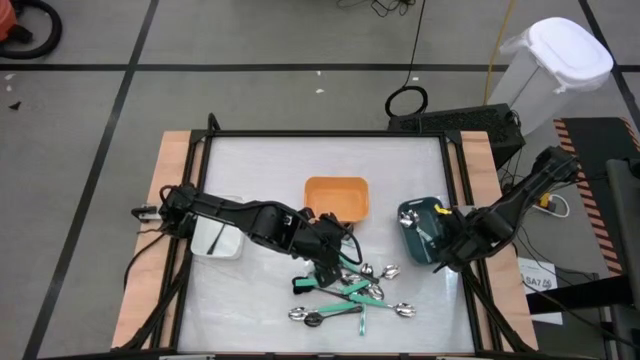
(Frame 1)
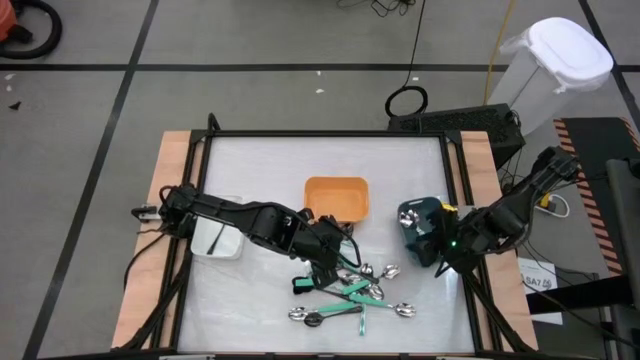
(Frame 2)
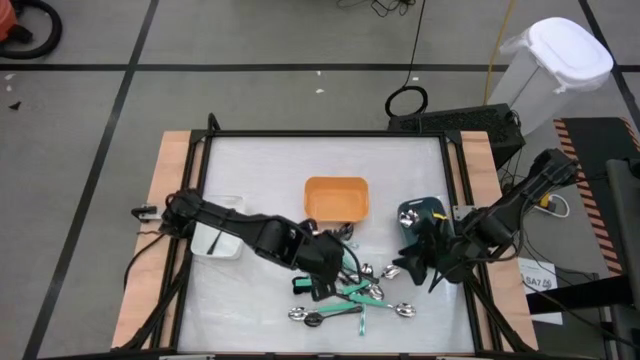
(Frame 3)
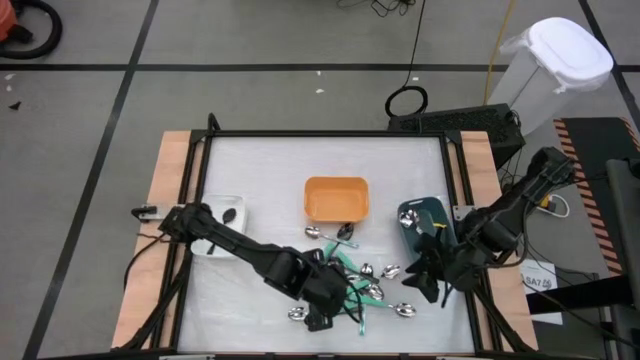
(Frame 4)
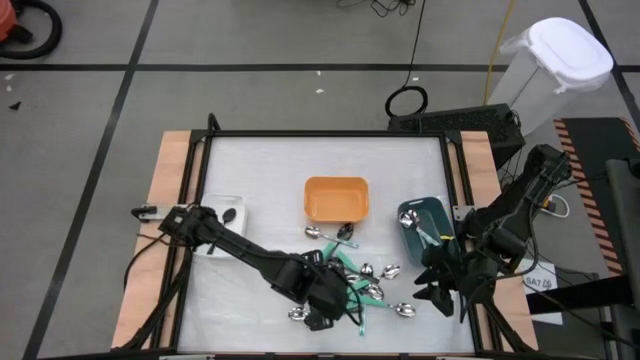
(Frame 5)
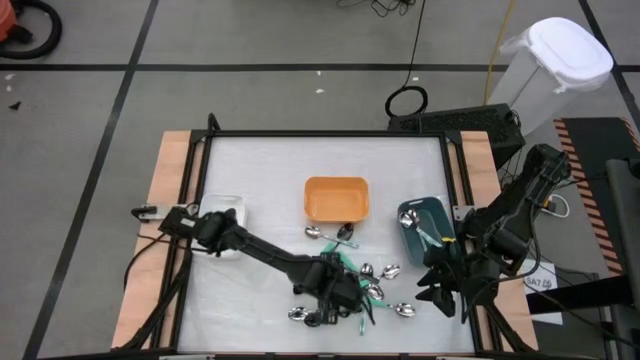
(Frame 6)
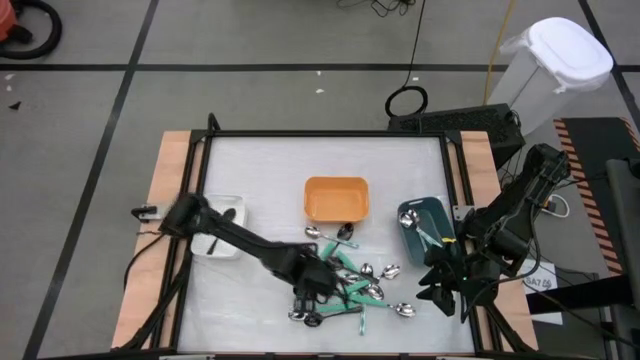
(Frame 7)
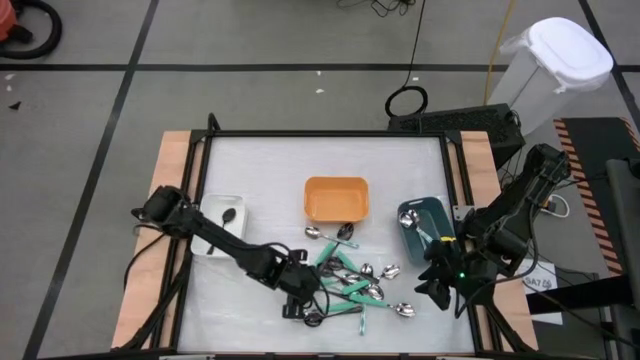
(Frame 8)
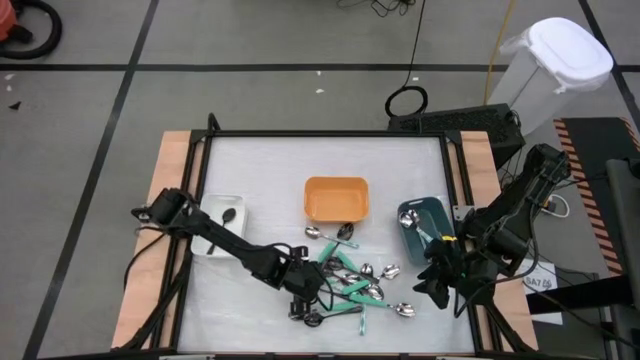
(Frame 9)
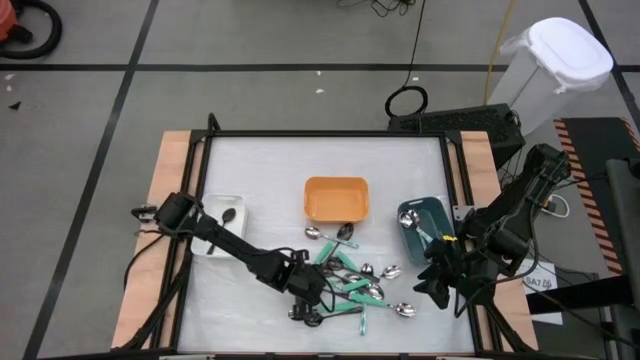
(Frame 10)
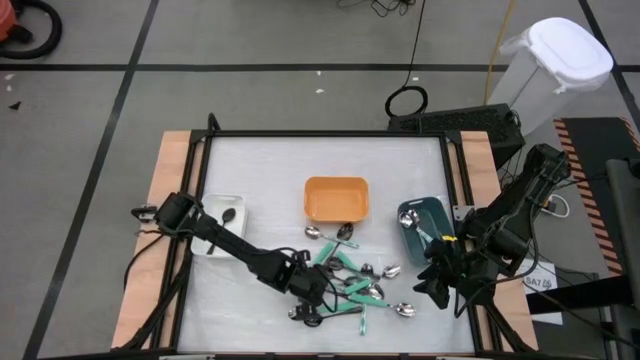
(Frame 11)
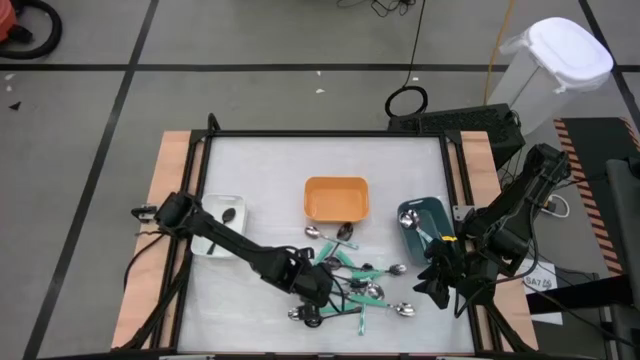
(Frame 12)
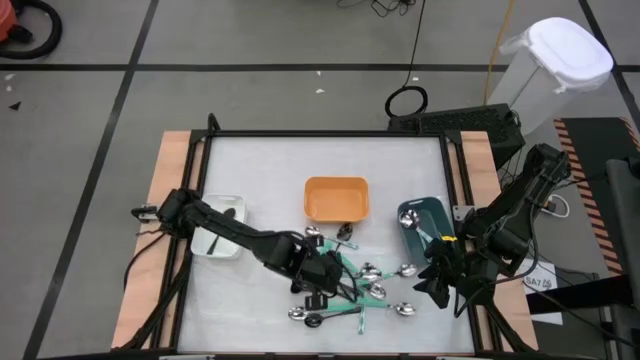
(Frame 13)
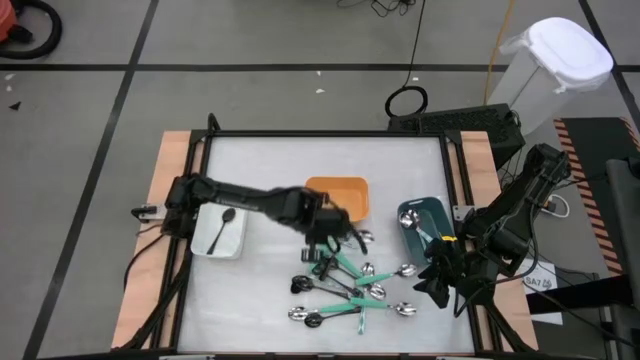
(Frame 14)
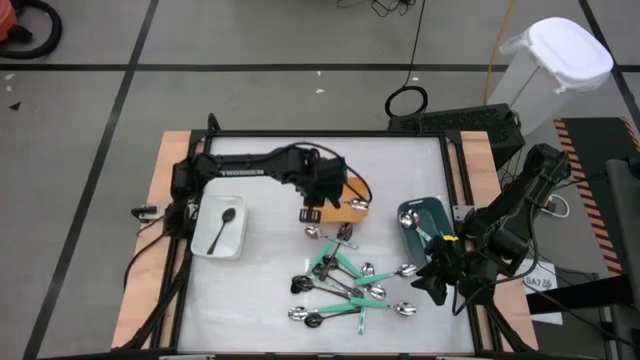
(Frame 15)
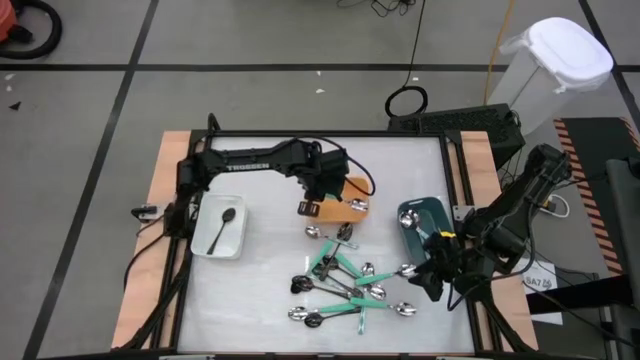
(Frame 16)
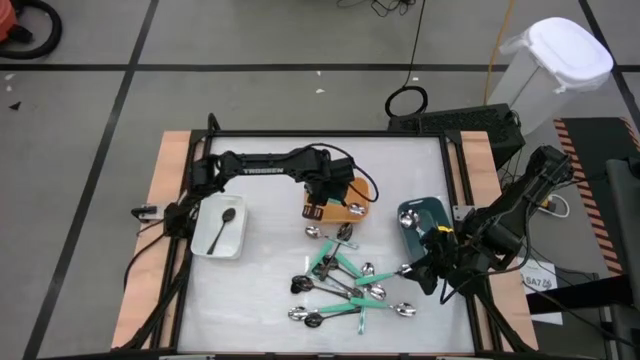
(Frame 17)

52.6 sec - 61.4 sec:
Task: Sort silverware by color (type)
Put the green spoon into the orange bin

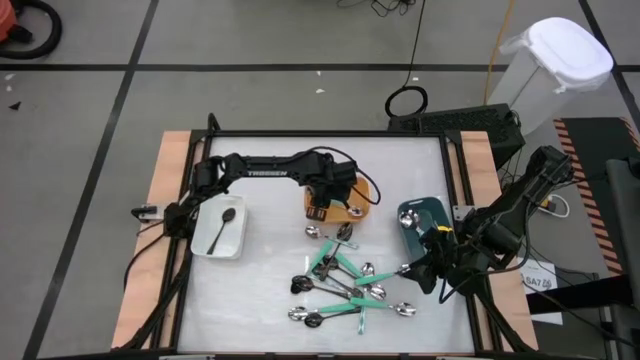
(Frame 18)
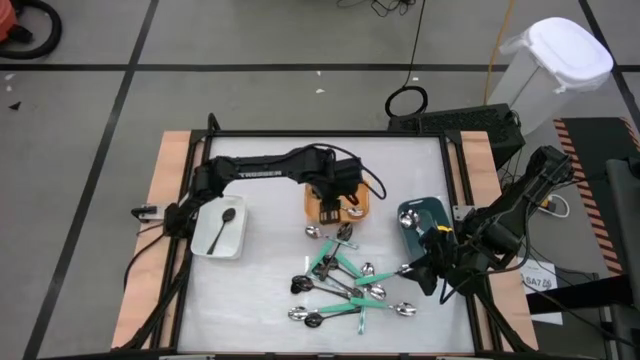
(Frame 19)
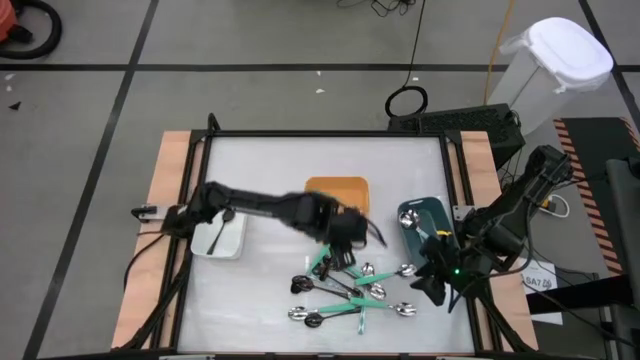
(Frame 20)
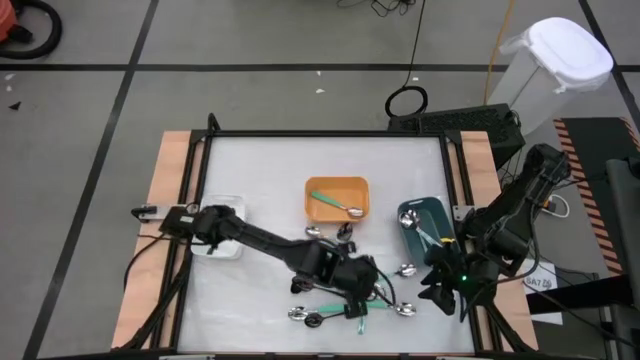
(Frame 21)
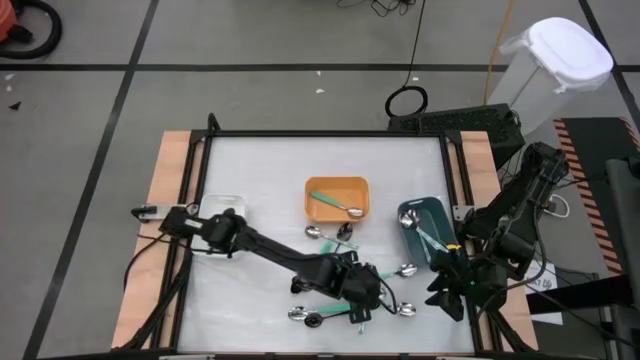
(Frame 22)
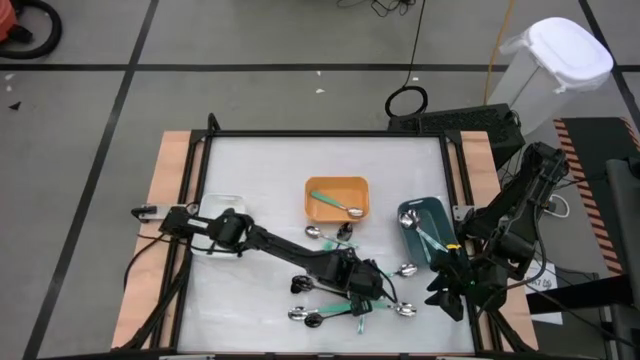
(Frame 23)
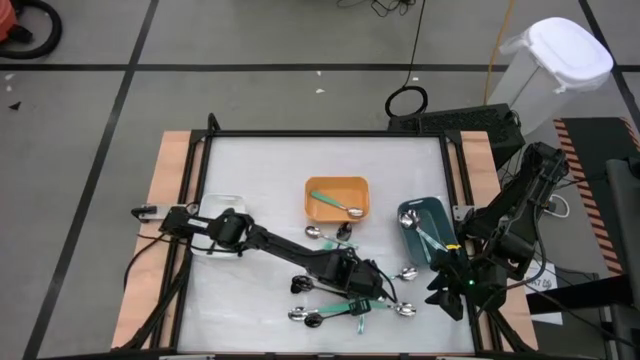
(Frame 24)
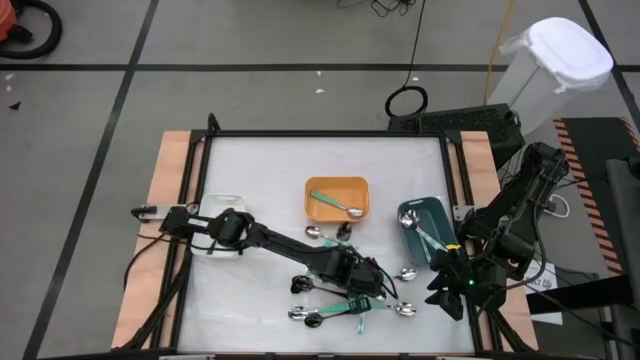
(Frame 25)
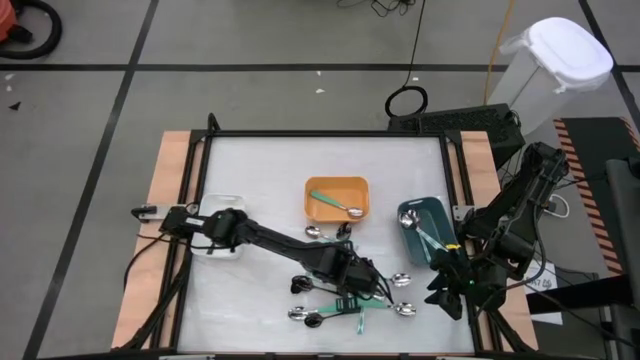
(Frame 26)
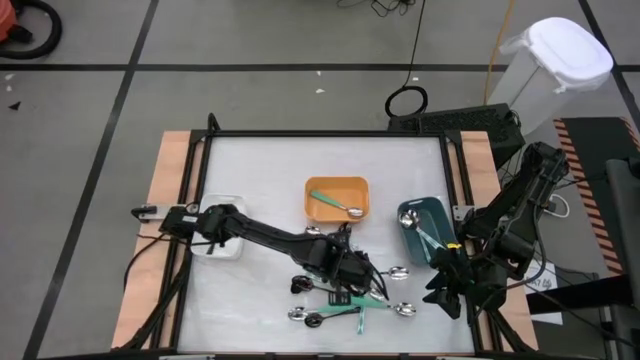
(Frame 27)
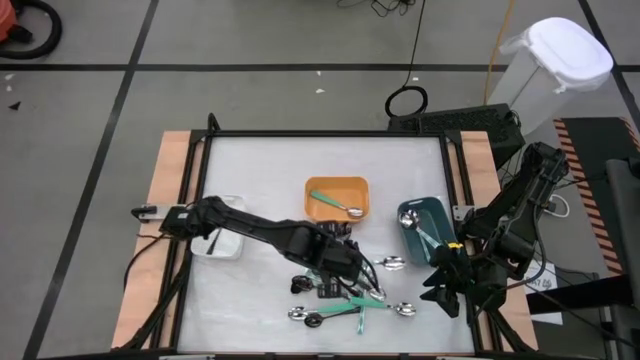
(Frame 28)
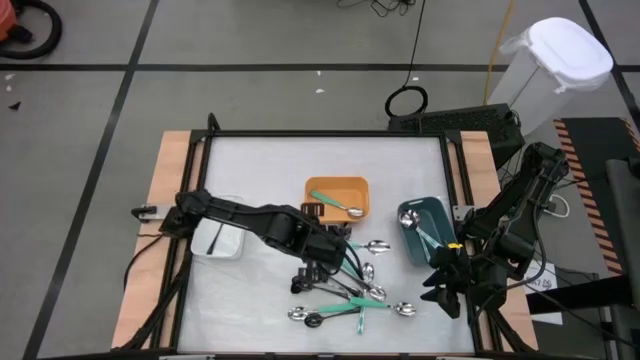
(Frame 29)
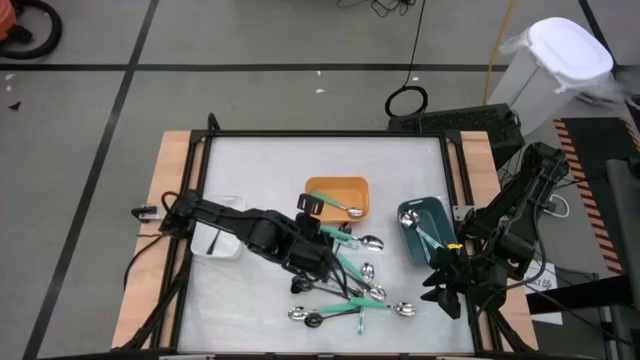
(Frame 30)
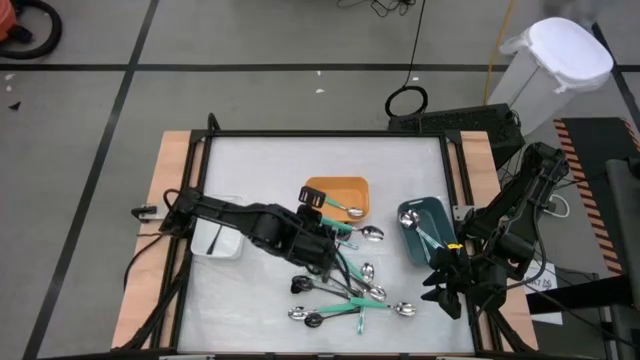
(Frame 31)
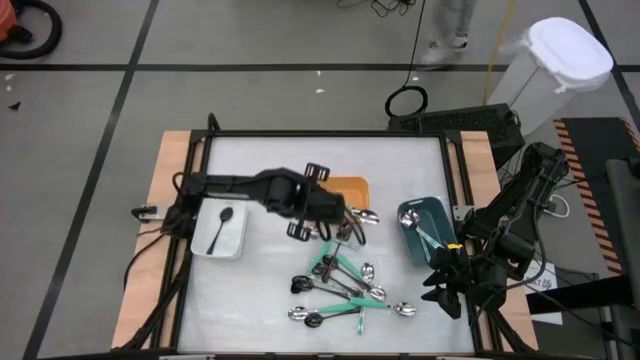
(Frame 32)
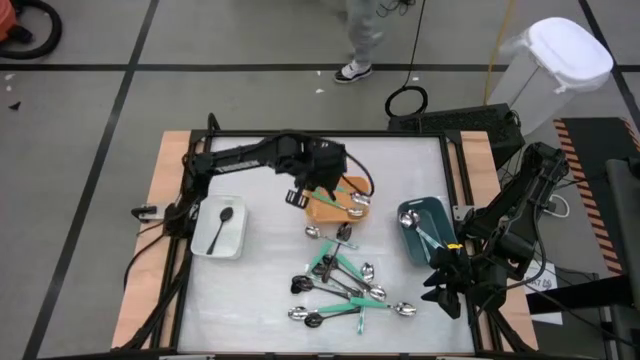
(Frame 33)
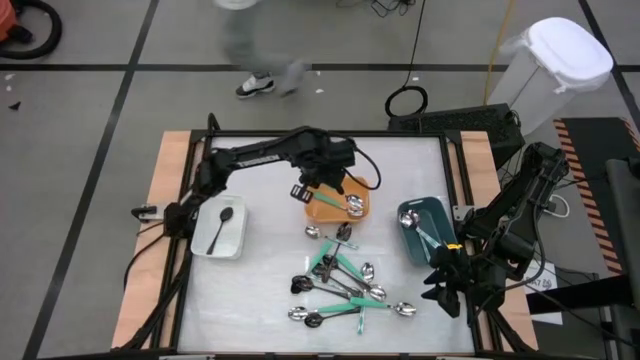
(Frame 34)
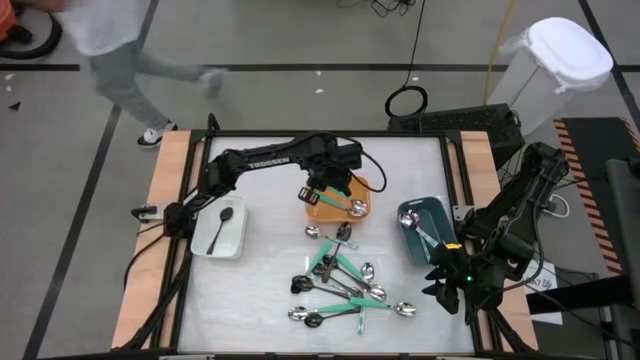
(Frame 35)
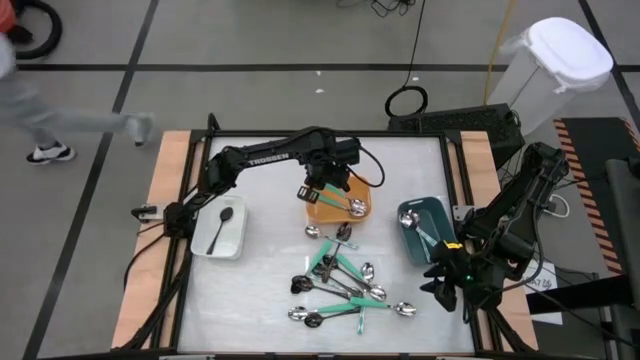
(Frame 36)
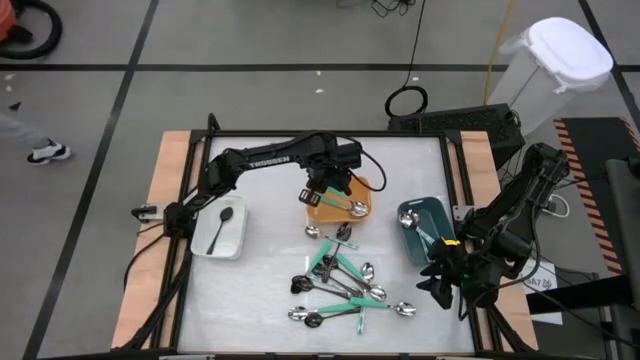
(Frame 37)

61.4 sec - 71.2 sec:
Put the green spoon into the orange bin

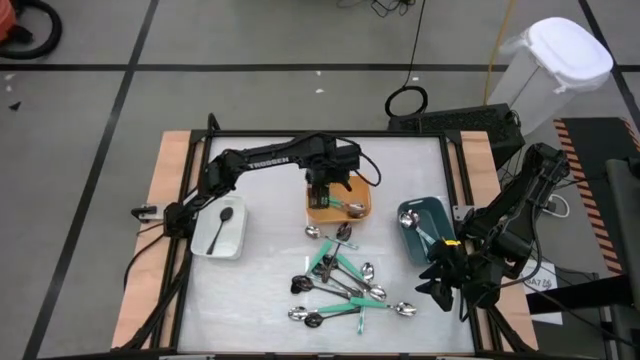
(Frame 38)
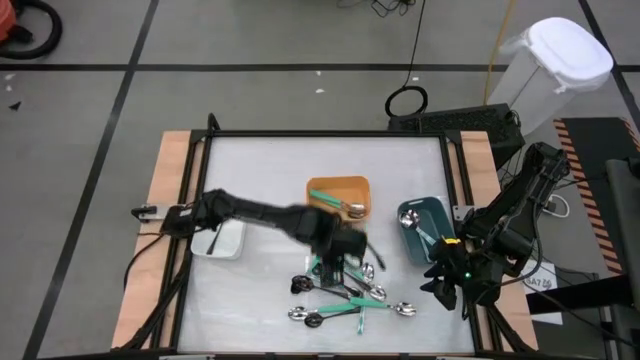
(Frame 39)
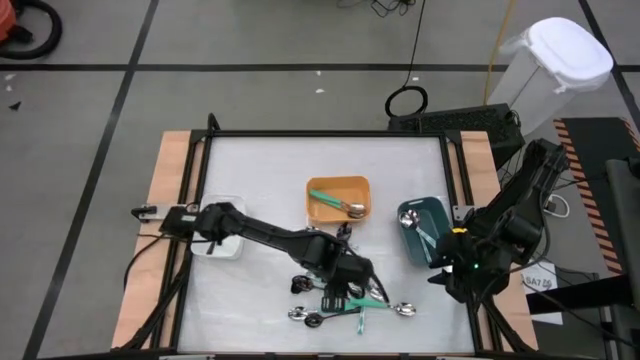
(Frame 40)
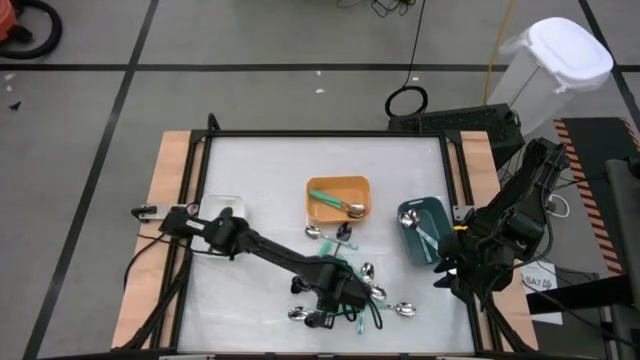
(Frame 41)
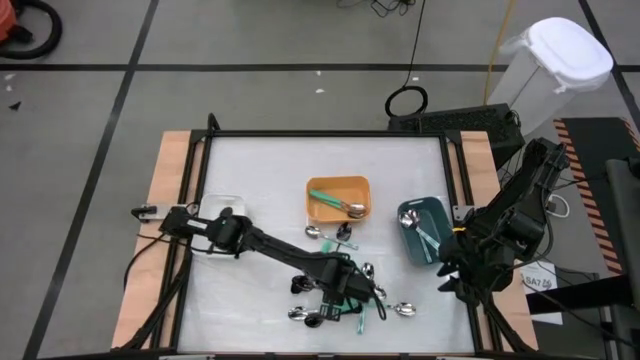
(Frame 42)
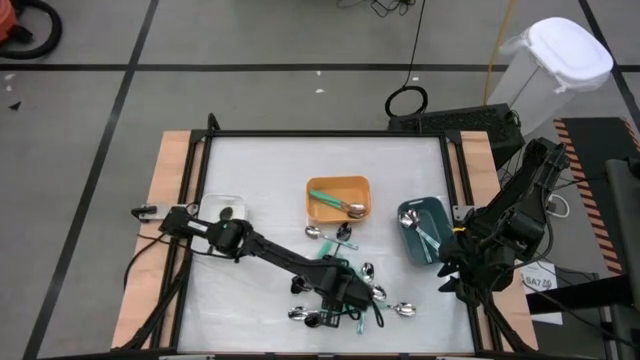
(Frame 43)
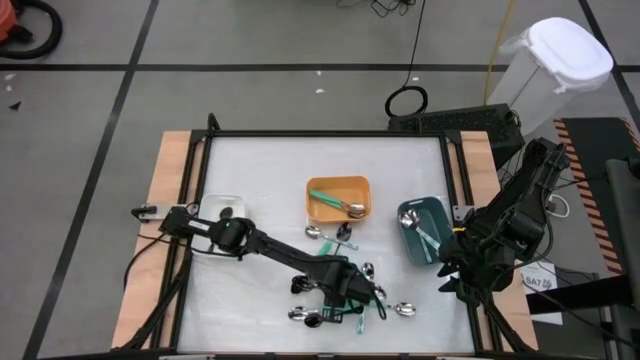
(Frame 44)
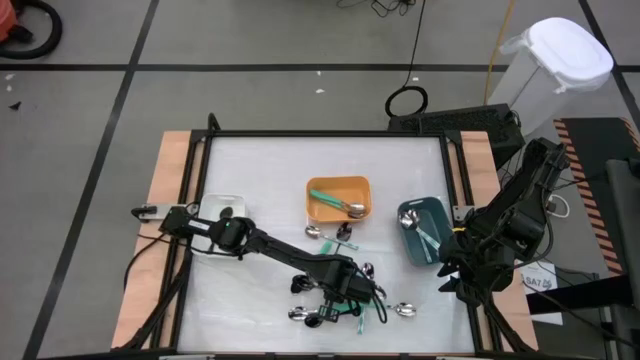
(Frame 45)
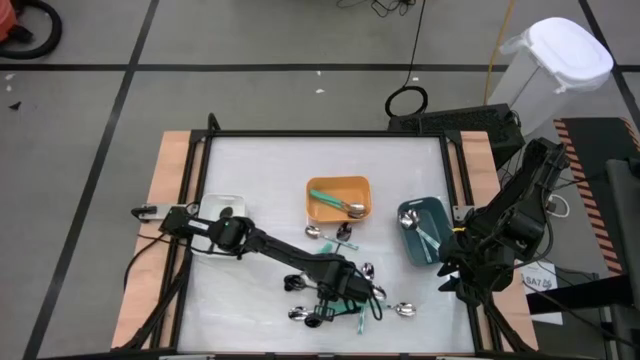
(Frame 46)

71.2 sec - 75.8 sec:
Put the black spoon into the white bin
